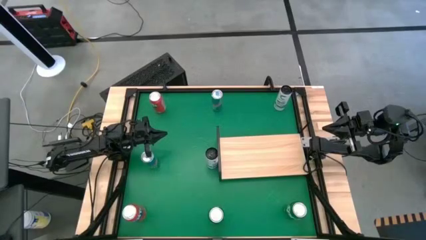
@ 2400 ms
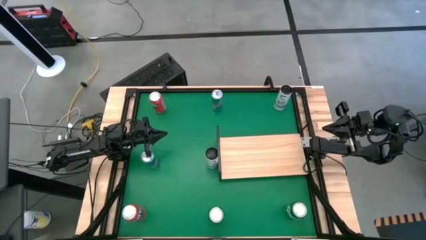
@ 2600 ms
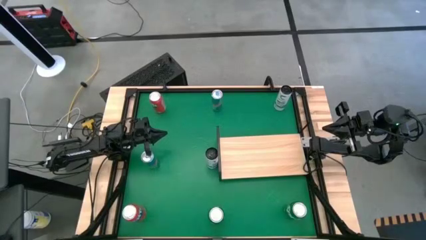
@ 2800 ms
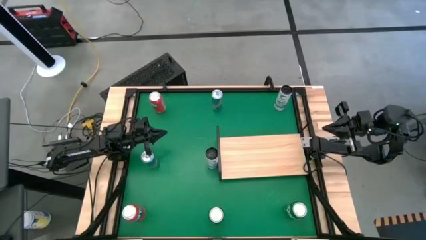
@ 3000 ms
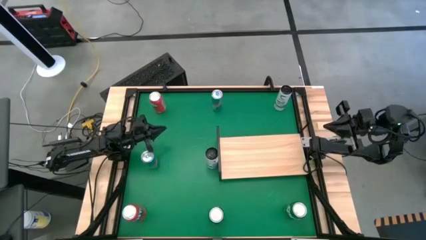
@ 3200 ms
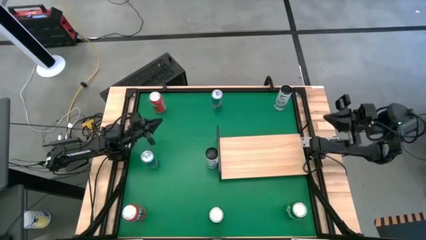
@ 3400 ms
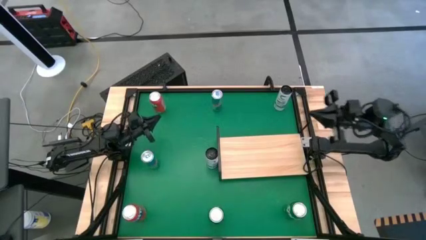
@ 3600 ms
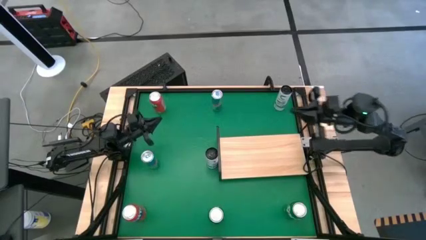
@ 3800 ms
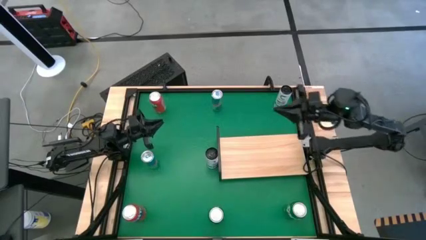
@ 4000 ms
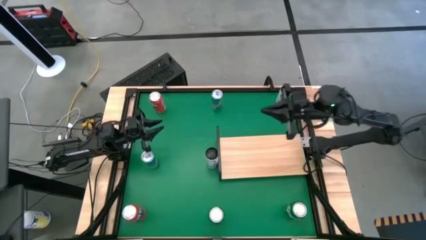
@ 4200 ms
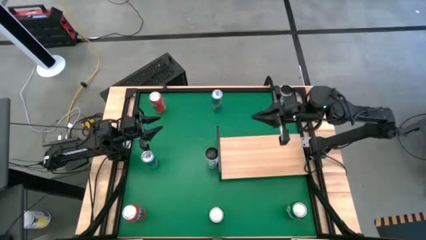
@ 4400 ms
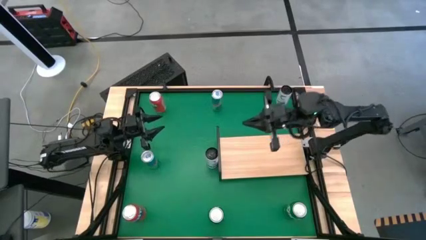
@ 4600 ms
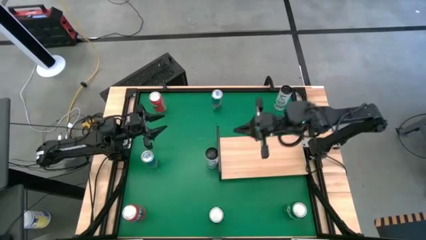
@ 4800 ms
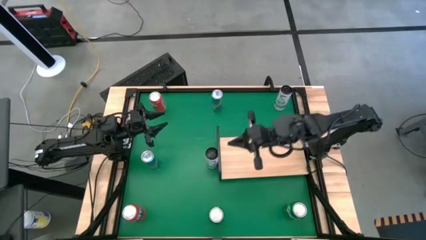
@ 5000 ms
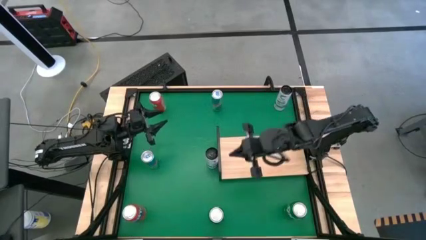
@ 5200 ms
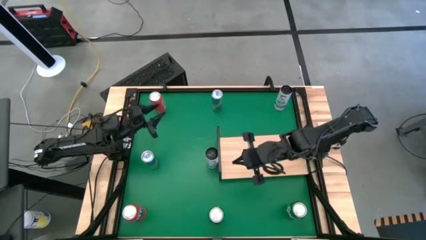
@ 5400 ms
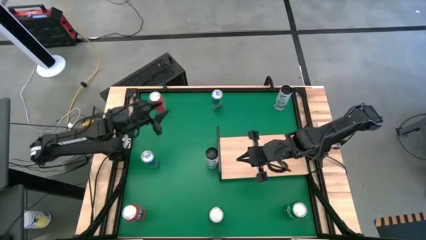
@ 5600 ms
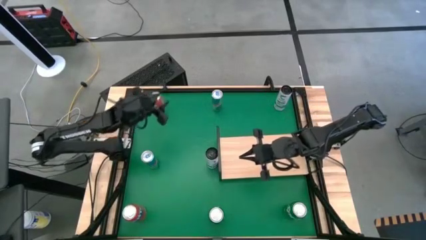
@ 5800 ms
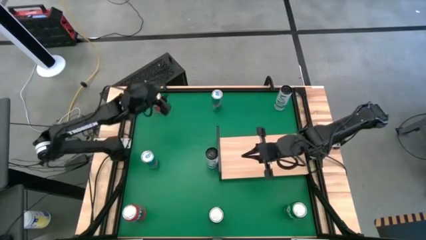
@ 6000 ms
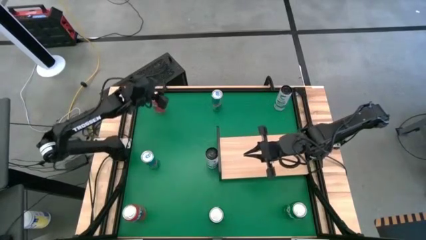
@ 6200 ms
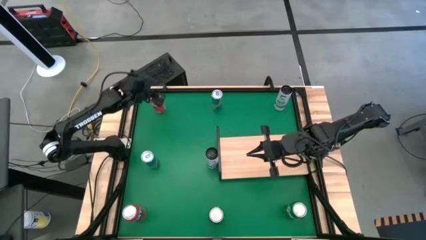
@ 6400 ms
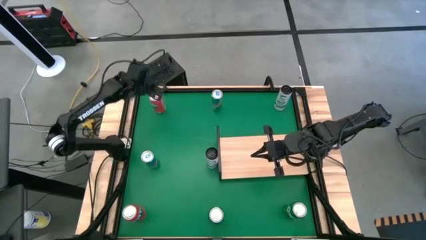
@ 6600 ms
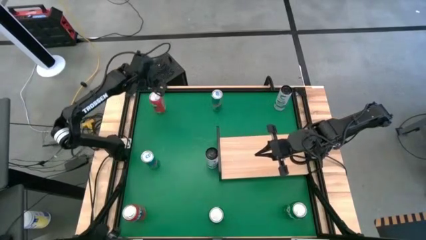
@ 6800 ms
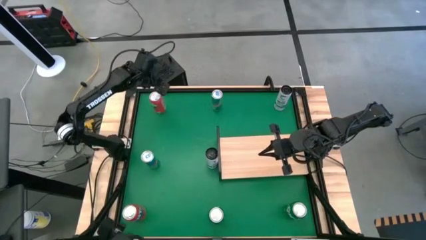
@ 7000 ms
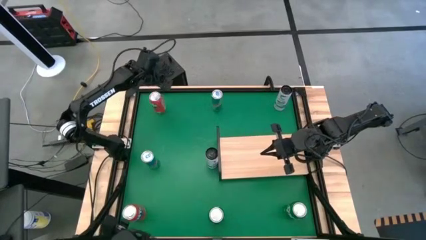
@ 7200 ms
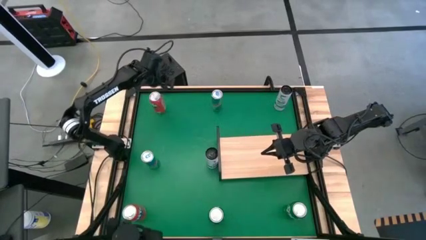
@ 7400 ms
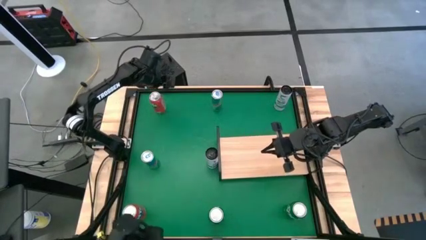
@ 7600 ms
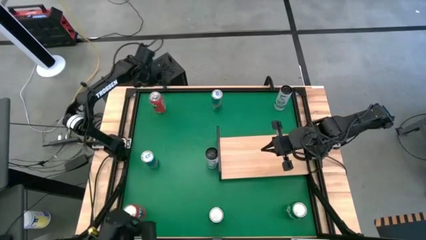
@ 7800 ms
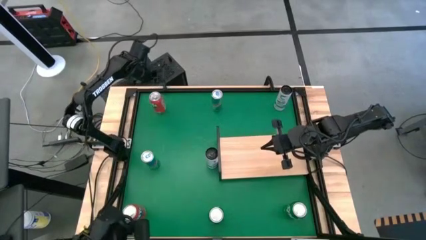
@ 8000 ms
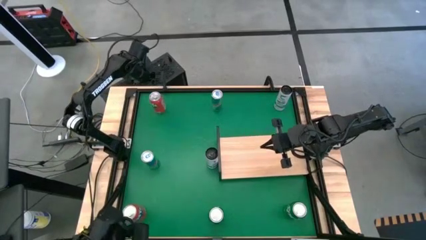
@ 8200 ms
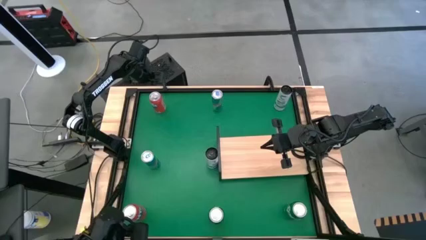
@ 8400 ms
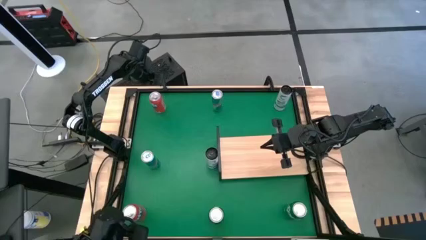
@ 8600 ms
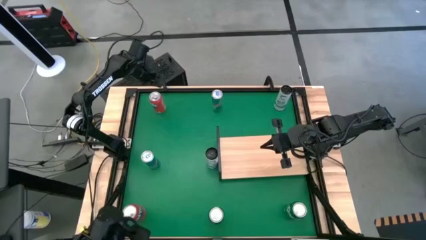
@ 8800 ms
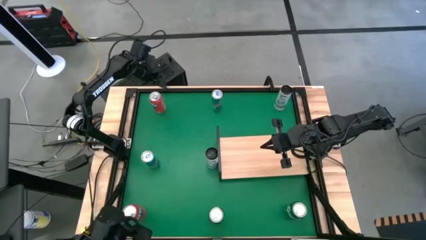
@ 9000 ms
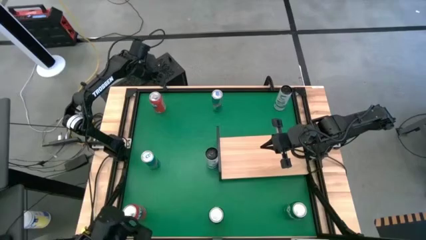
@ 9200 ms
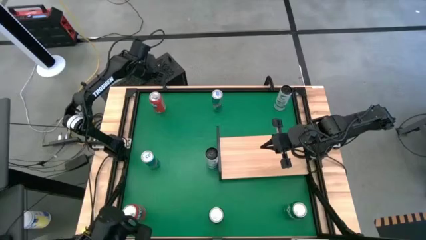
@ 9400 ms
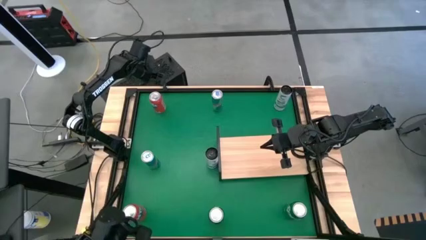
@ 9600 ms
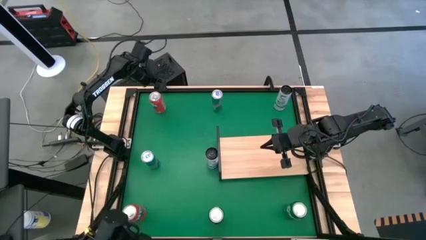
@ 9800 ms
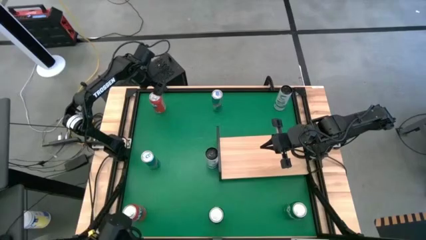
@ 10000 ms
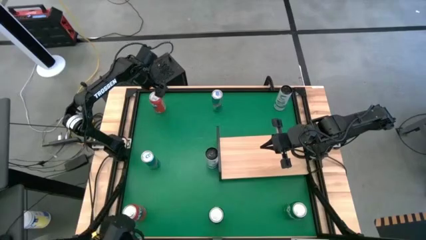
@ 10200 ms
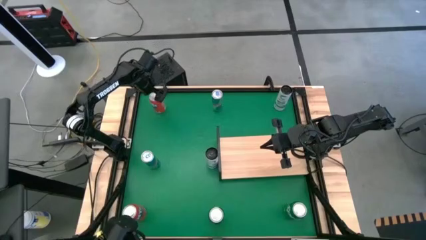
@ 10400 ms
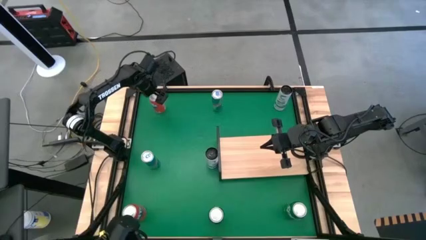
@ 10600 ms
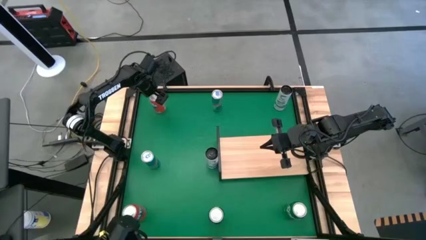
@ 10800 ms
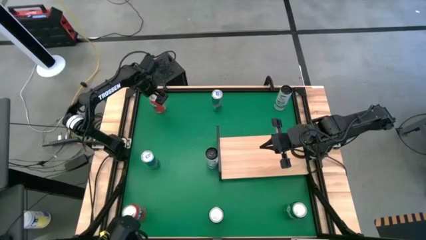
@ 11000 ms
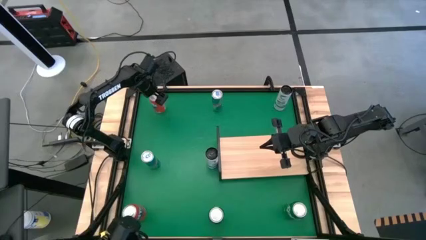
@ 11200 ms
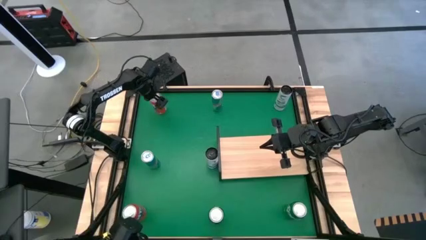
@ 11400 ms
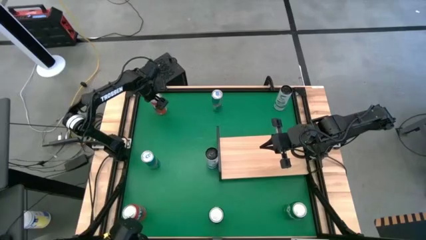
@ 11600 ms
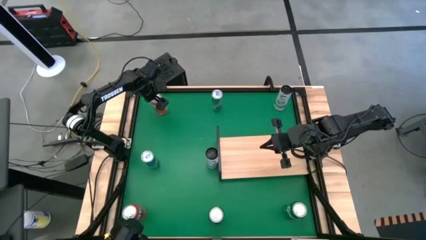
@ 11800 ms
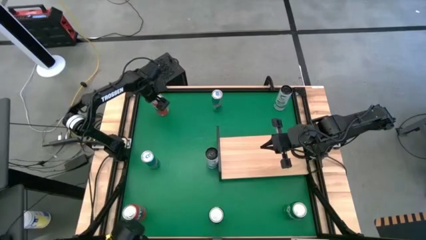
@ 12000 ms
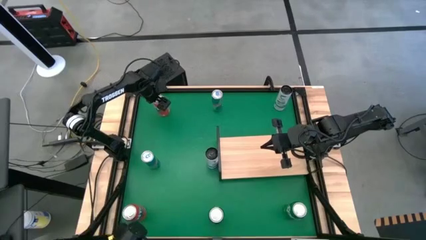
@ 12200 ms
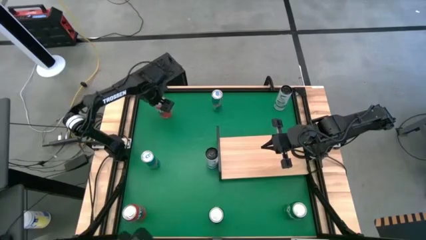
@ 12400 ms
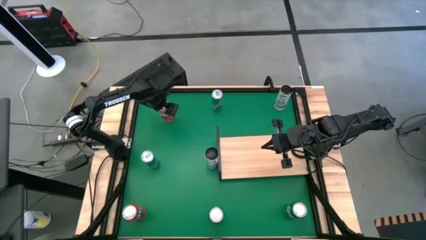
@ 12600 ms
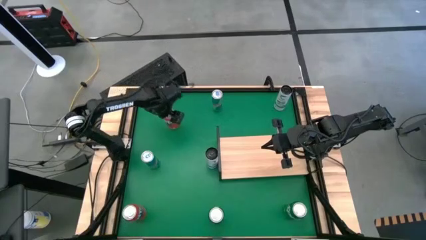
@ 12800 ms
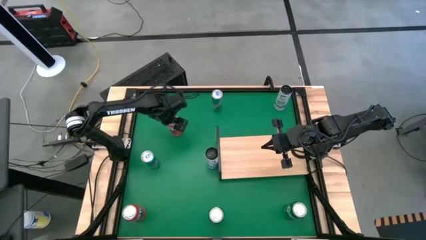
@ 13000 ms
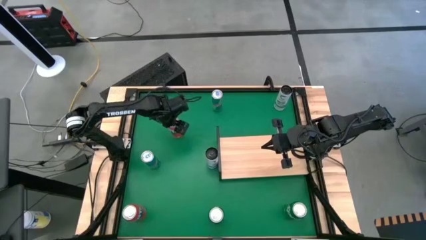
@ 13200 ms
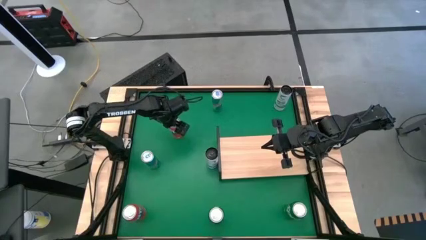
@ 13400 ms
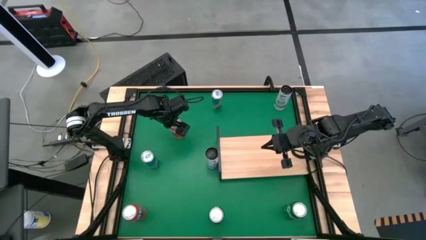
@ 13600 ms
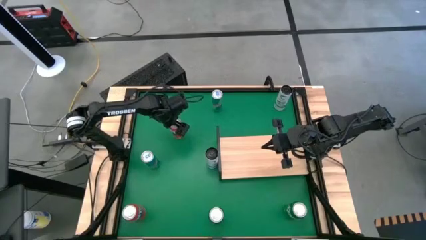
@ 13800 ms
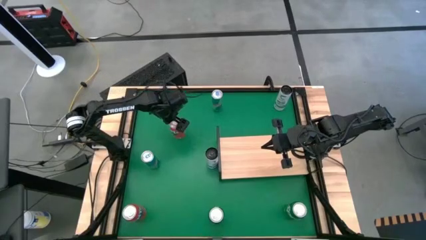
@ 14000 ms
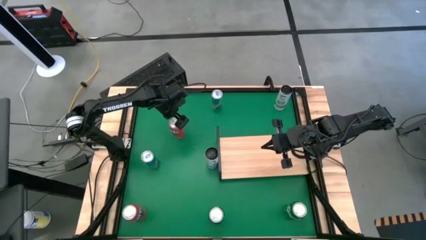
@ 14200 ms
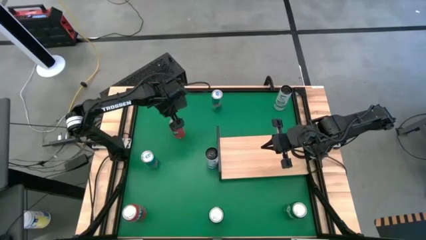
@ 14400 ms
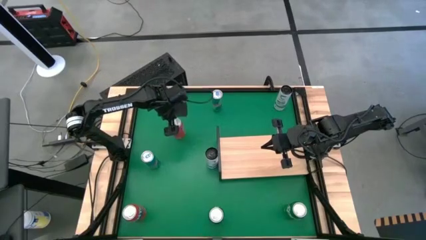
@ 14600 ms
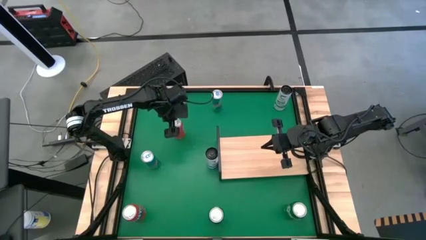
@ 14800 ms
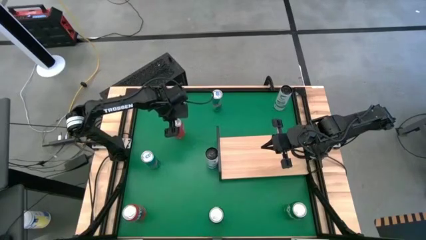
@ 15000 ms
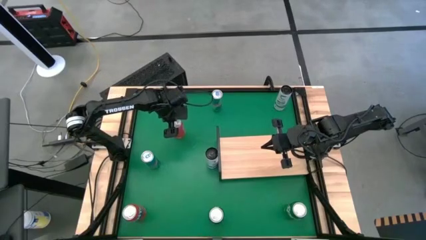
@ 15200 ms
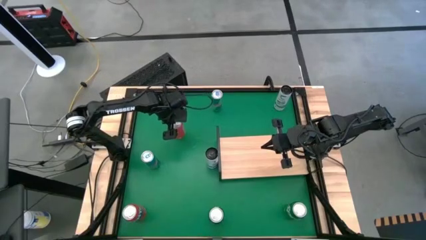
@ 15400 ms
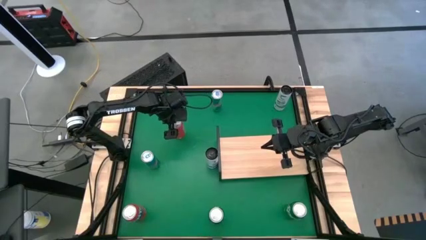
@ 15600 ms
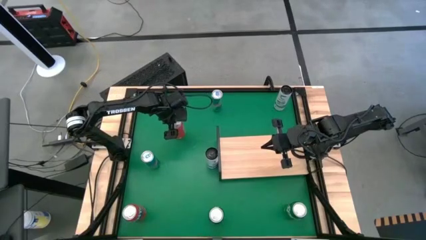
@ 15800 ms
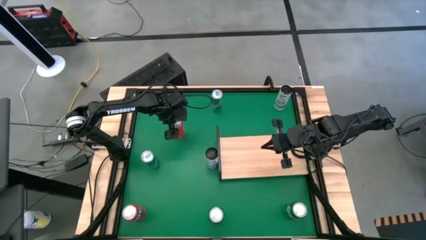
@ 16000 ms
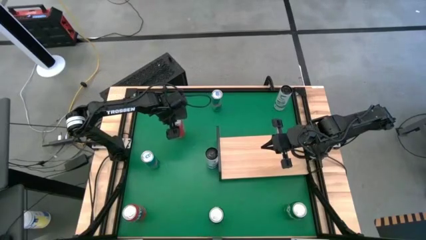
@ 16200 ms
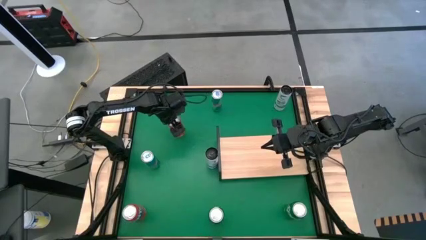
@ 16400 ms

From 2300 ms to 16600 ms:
Task: Place canned beverage on shelf
Put the top orange soda can on the shelf
